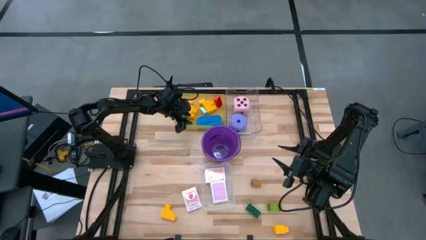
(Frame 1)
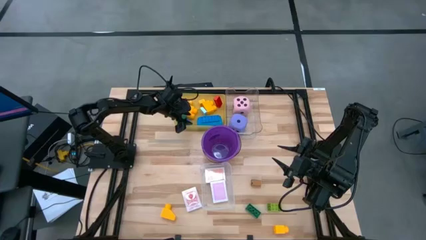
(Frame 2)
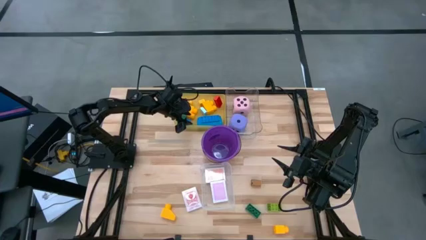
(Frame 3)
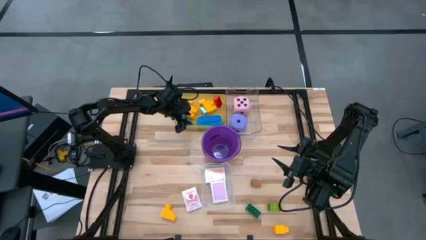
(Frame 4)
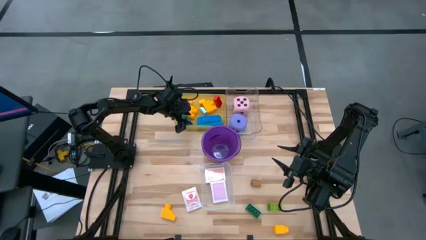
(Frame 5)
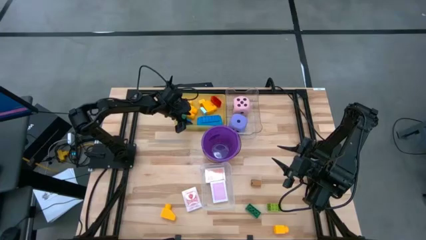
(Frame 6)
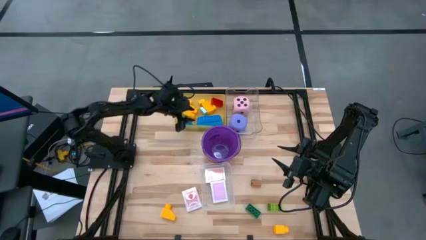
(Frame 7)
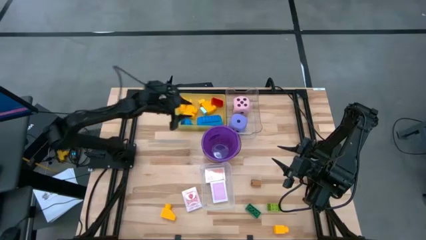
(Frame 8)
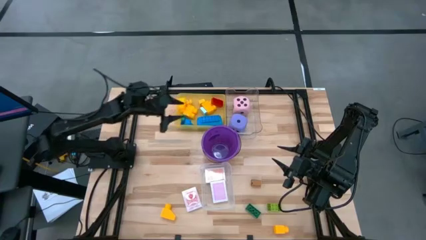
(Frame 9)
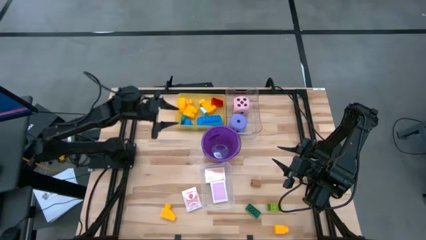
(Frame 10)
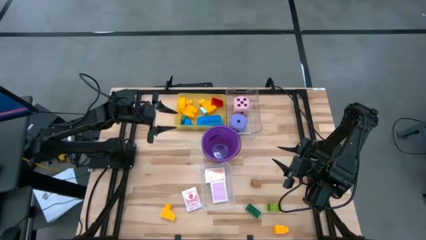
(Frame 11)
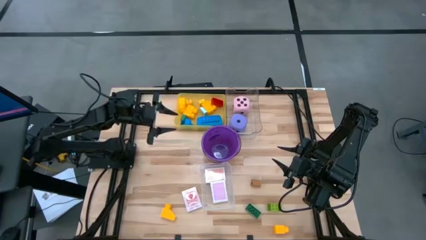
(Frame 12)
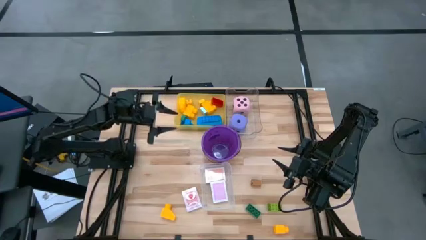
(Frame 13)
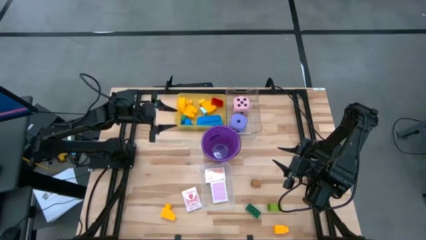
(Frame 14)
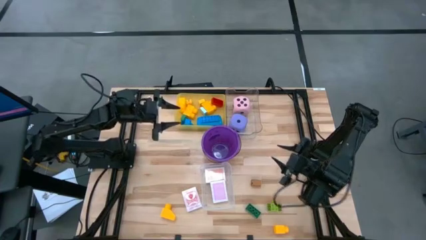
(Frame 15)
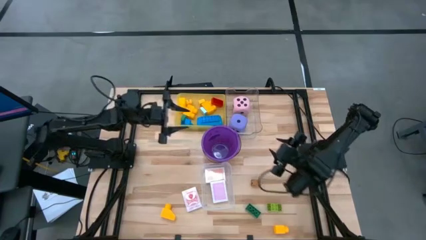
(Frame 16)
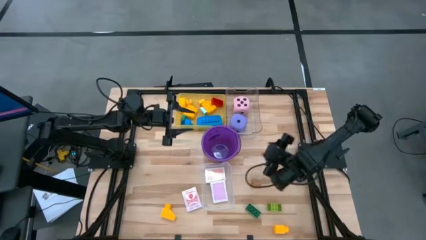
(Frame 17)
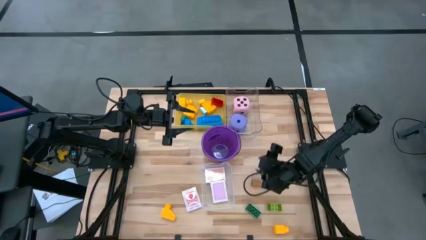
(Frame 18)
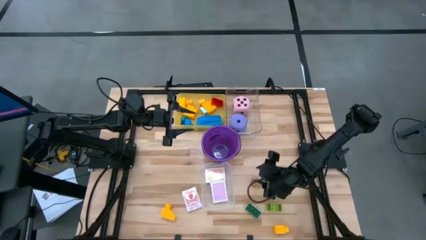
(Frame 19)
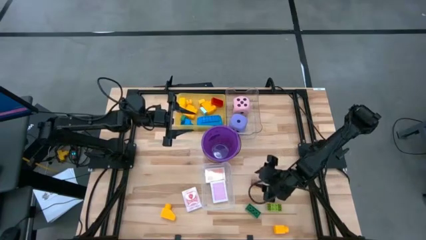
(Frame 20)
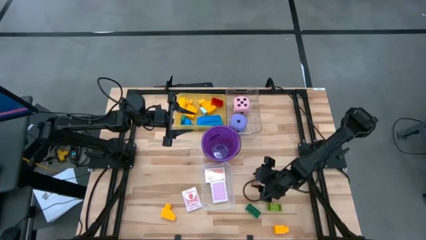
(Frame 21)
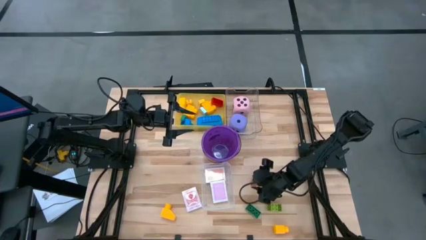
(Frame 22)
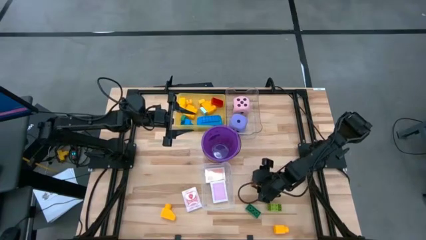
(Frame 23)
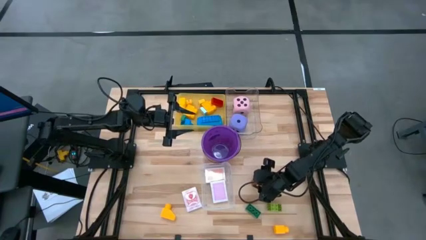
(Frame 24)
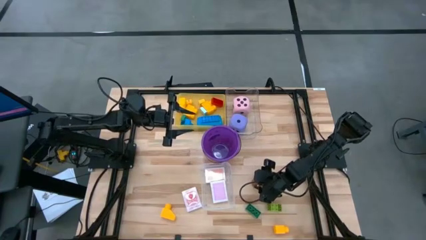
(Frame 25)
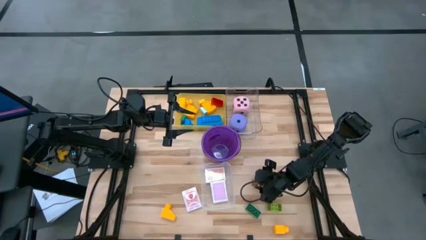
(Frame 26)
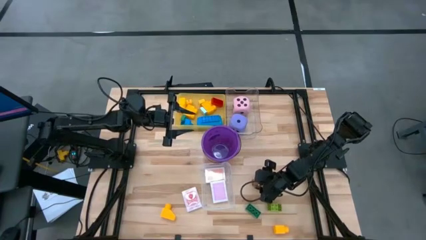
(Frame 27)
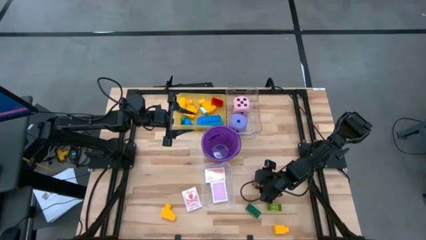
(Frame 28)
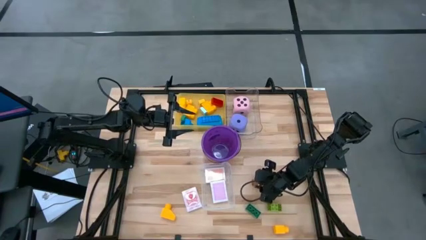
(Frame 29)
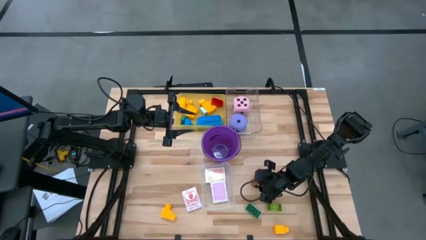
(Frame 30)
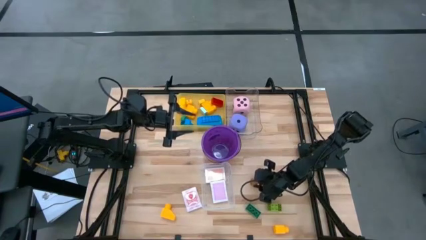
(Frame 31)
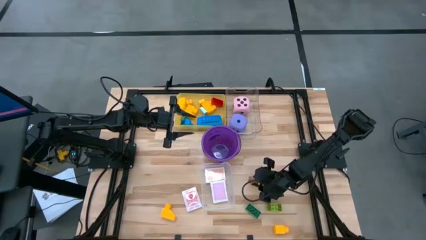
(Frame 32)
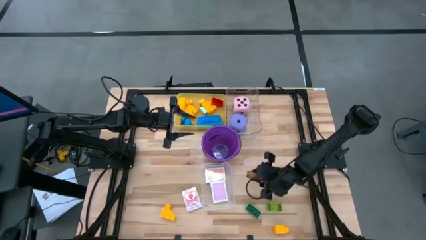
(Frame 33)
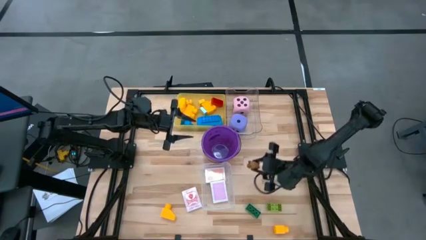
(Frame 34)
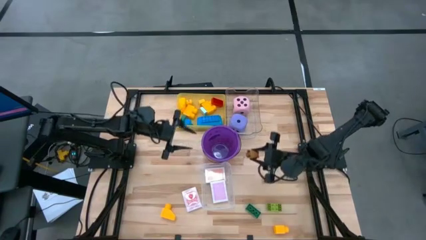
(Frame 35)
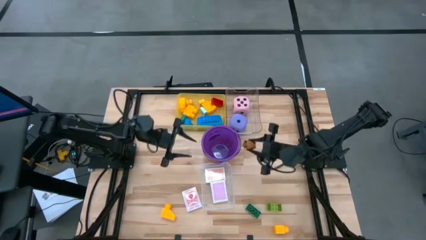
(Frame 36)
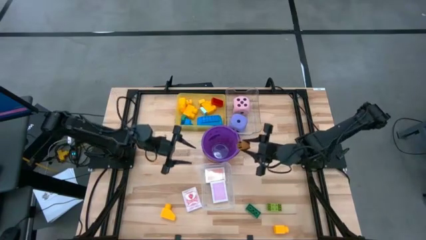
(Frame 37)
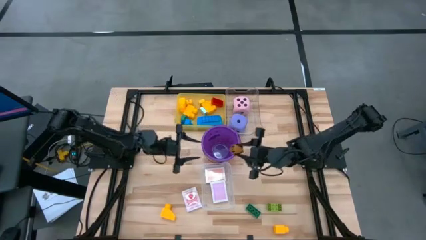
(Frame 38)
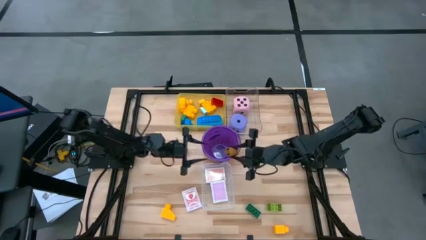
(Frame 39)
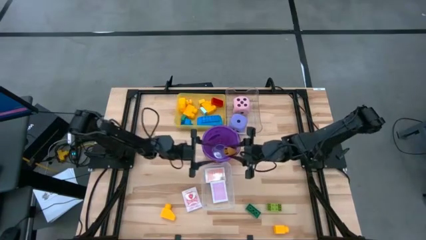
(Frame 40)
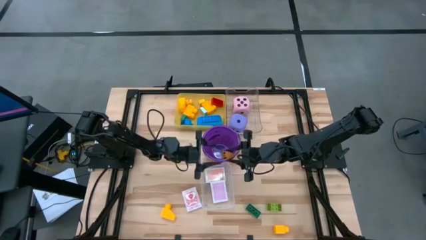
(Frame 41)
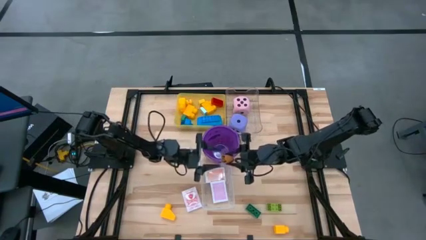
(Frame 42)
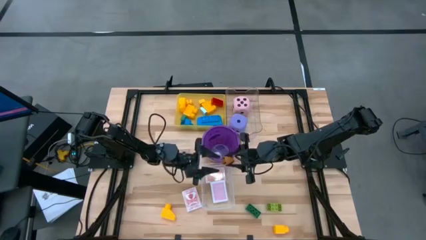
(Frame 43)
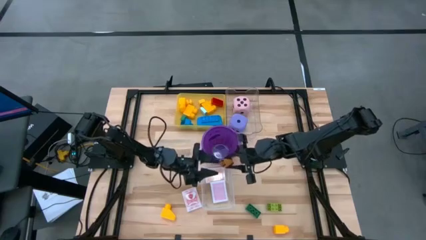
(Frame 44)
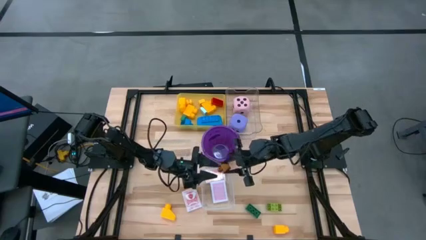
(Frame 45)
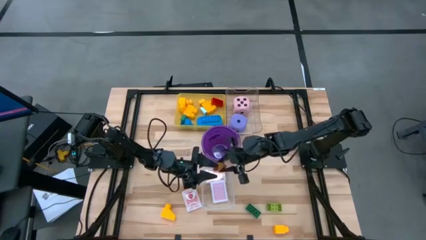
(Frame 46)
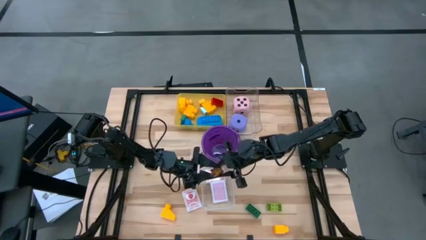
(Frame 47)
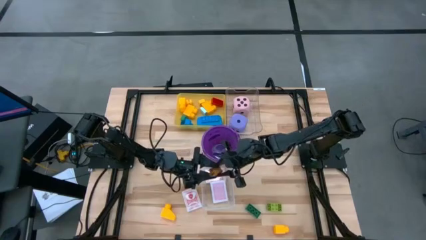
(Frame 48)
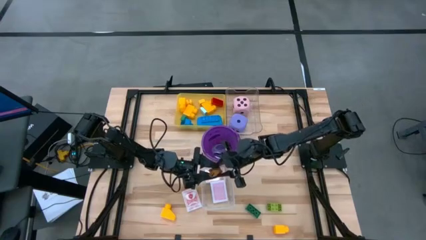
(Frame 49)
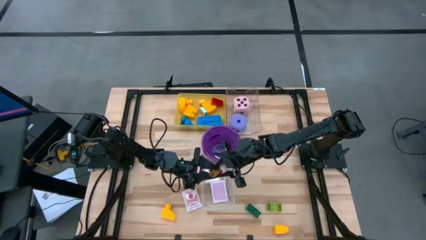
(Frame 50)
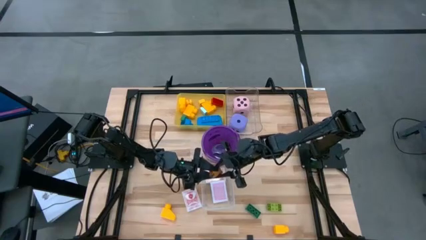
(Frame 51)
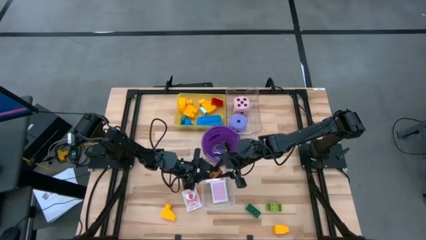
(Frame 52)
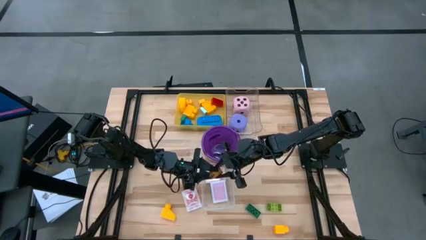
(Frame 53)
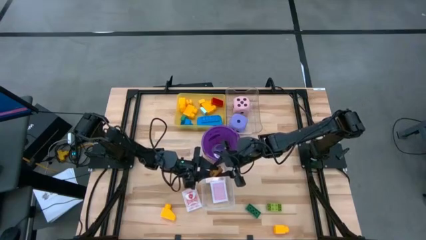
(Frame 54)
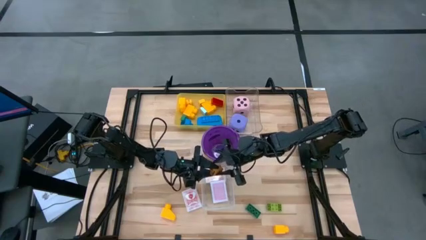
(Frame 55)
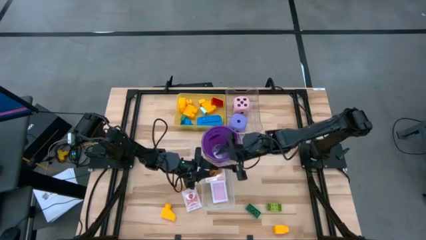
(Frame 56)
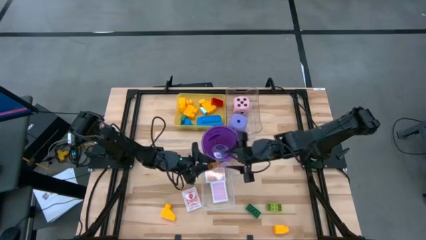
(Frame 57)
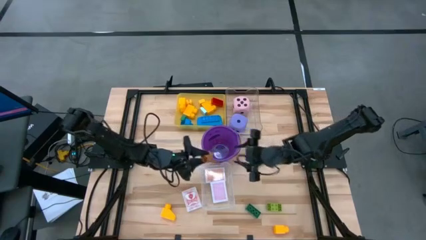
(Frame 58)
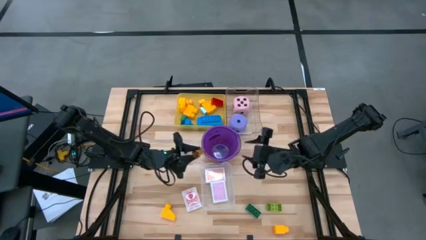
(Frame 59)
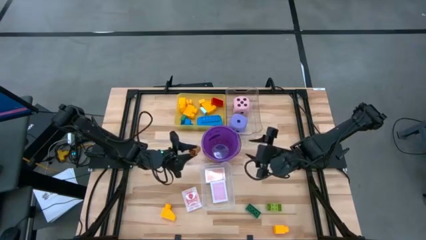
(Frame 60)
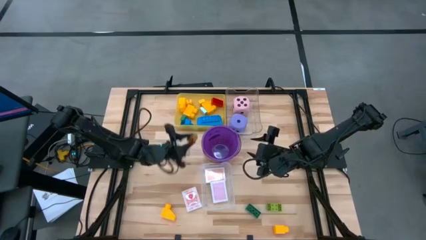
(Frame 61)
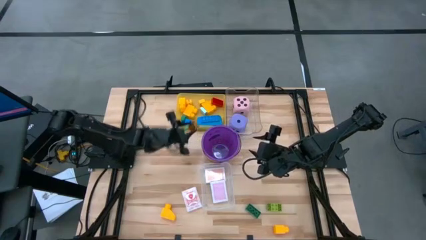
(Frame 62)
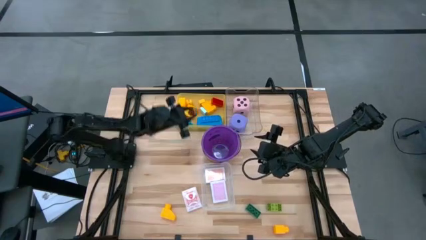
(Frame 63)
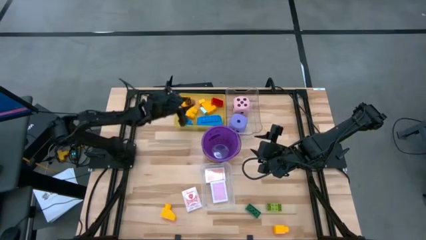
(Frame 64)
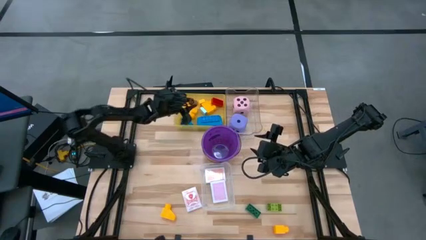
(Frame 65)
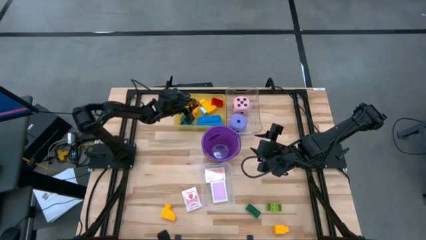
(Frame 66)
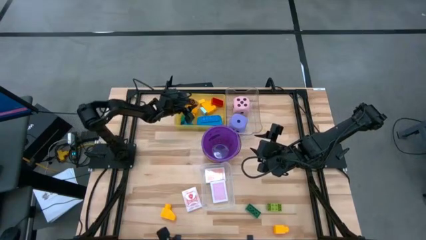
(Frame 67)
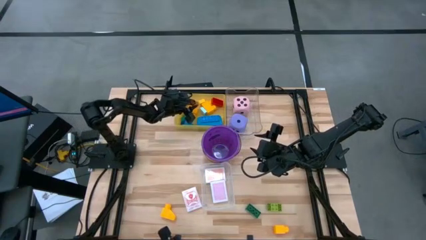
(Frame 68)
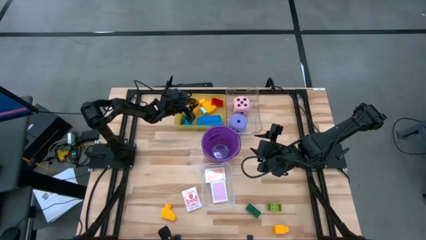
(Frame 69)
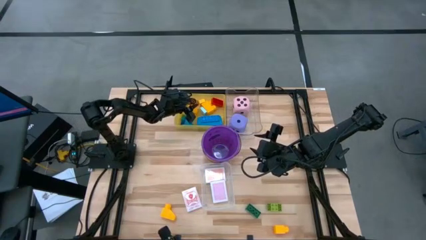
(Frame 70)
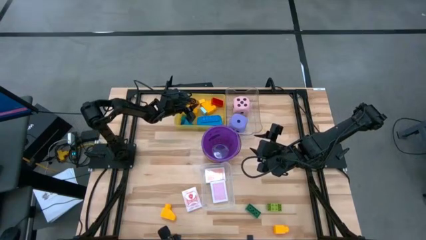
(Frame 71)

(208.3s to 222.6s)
Task: Pick & Place Toys
Put the brown game piece into the yellow bin

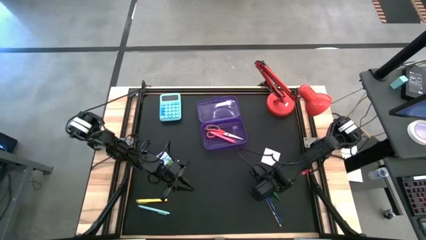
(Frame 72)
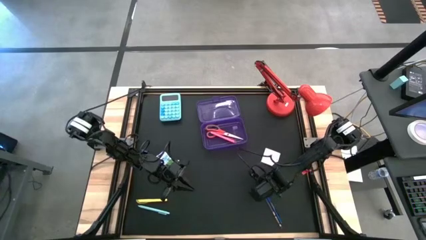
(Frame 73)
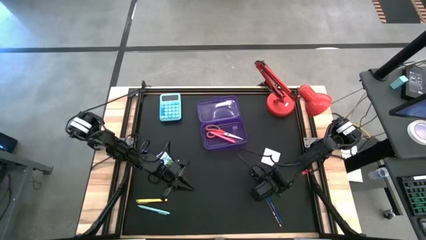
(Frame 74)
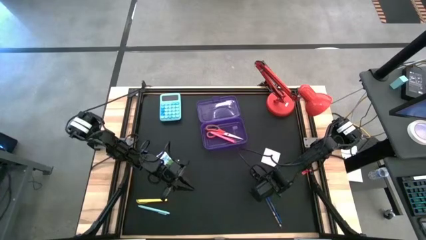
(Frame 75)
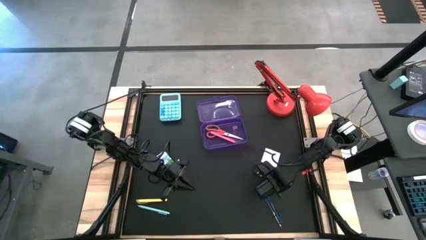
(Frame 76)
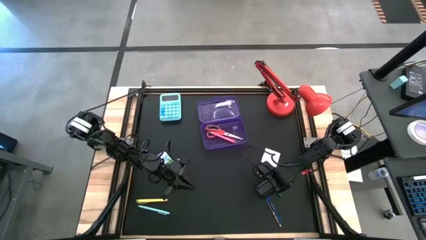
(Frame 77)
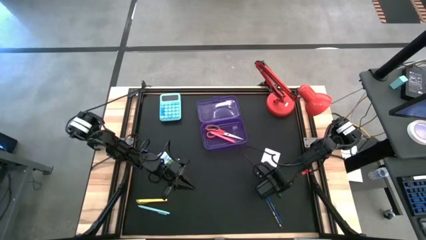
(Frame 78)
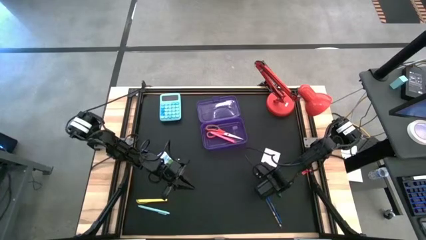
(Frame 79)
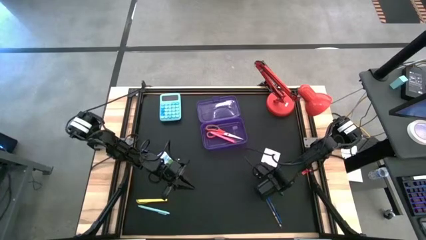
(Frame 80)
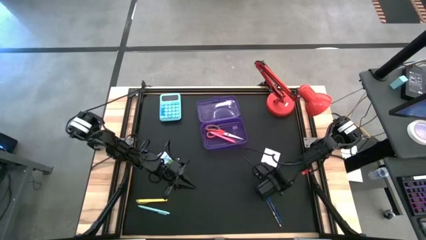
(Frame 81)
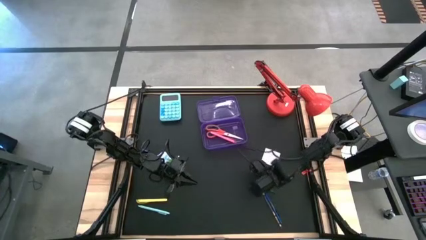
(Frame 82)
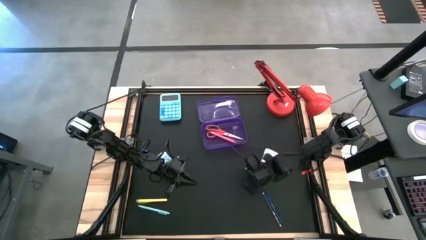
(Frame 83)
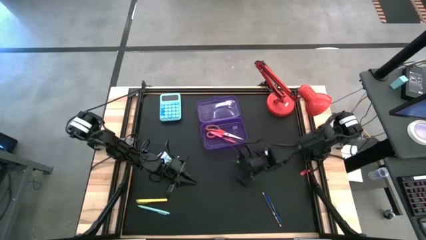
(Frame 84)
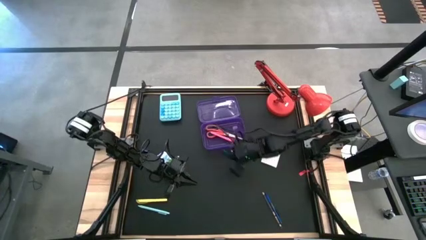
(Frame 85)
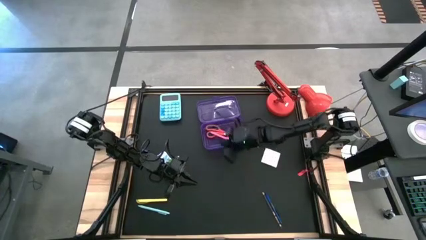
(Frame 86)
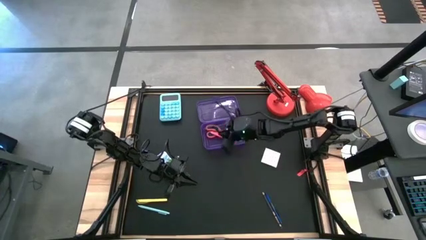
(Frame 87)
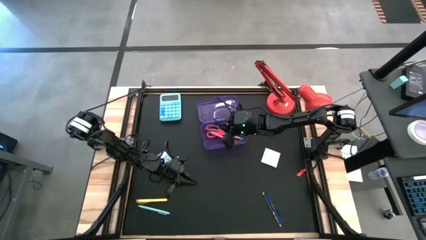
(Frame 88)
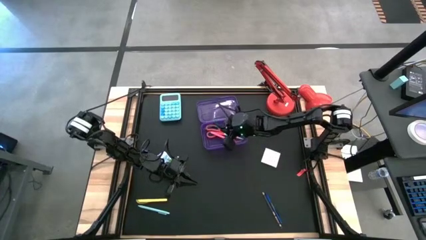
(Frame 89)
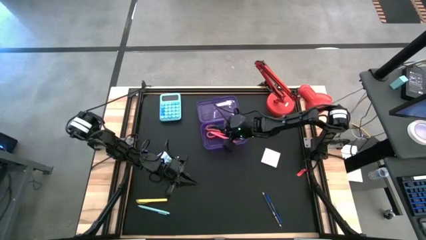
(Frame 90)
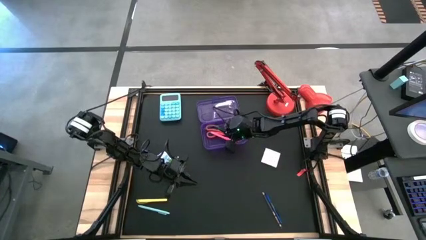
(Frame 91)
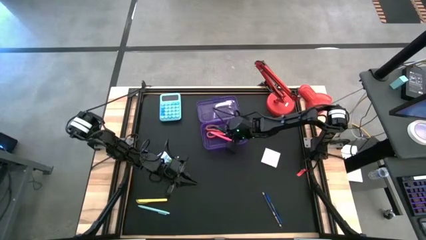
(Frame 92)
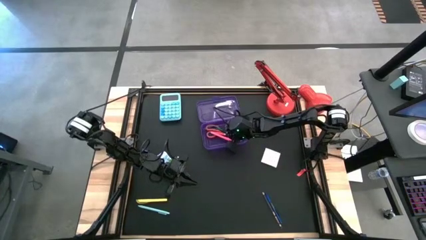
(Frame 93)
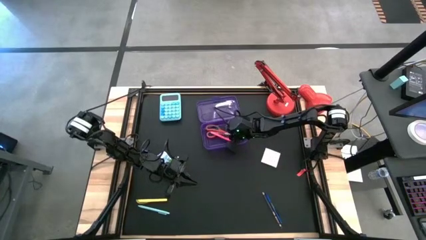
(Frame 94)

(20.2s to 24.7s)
Task: Pack school essentials
Put the green pen into the violet supply box
